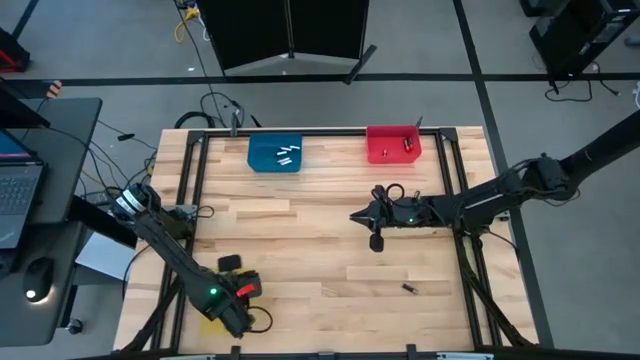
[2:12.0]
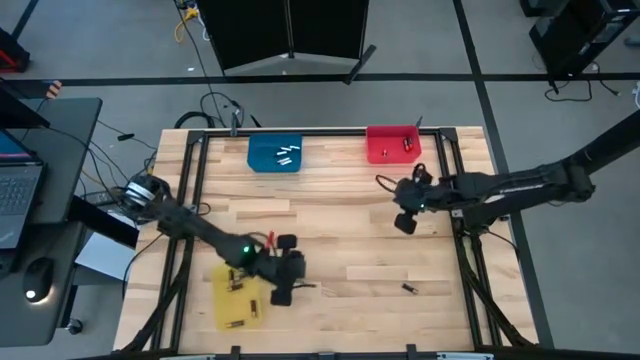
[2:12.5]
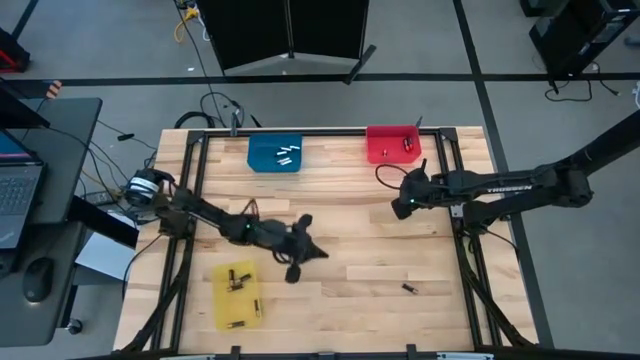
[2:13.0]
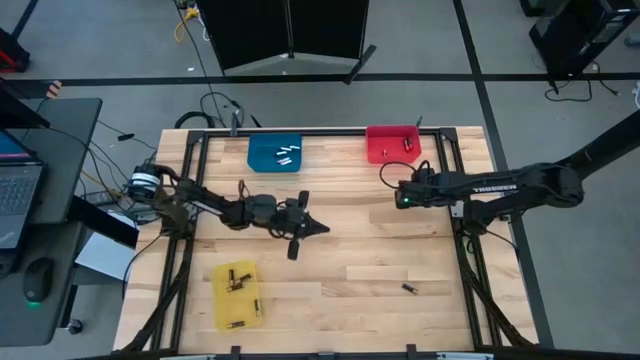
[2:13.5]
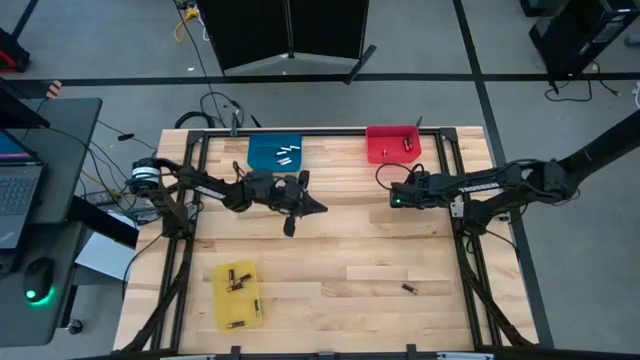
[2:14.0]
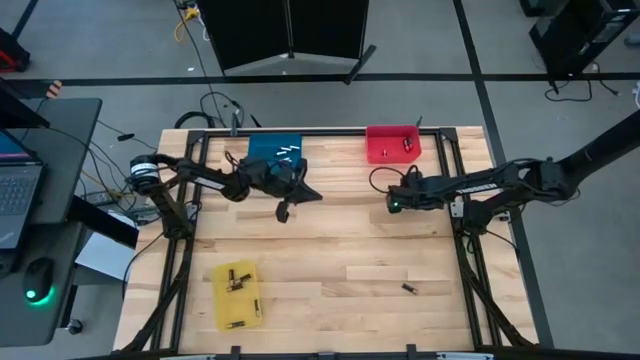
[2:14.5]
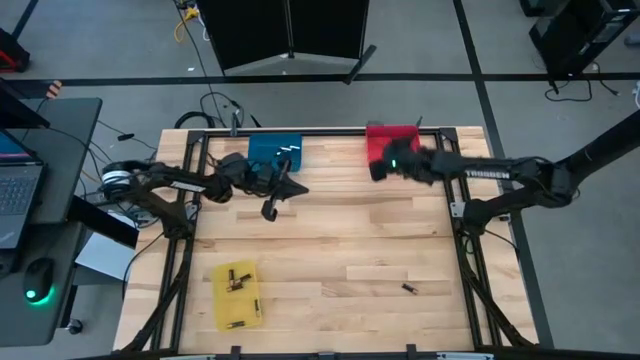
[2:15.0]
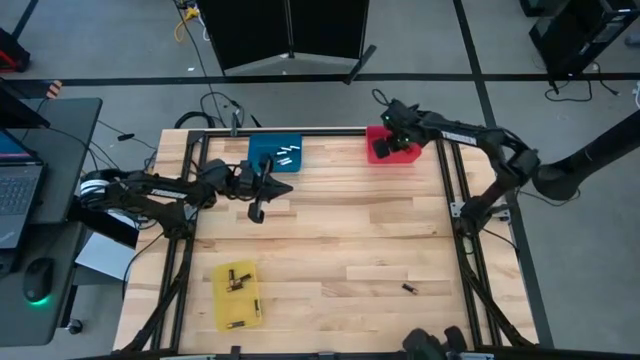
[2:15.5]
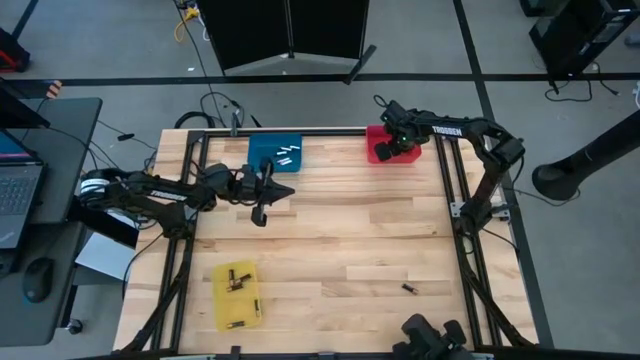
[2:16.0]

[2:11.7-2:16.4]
Task: Sort batteries
Put the black-red battery into the red bin

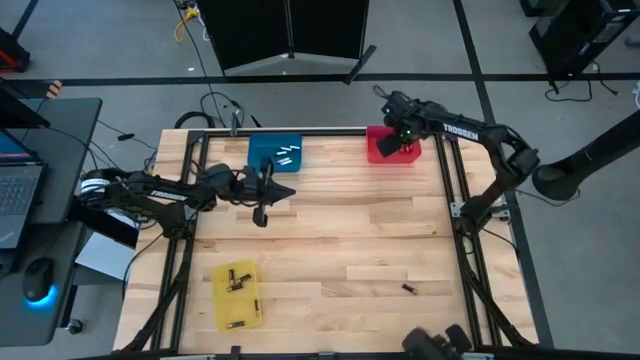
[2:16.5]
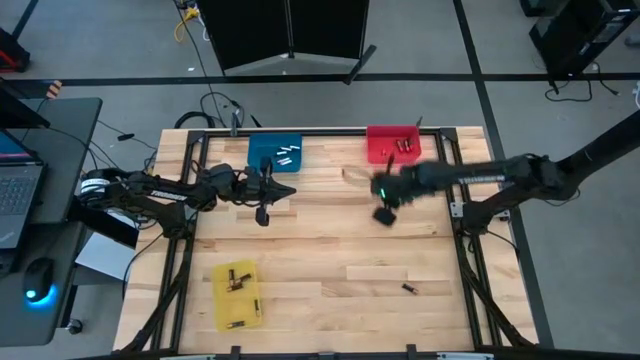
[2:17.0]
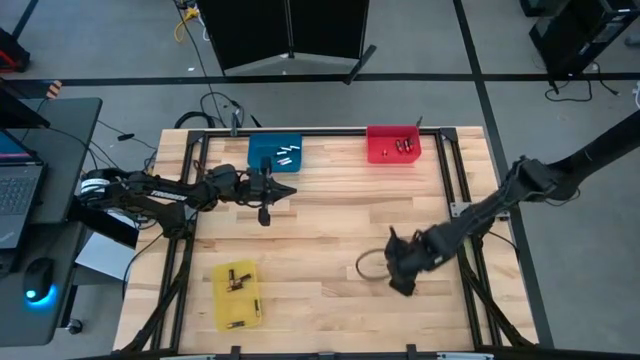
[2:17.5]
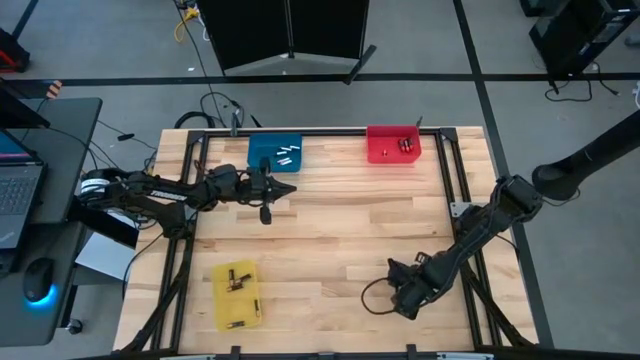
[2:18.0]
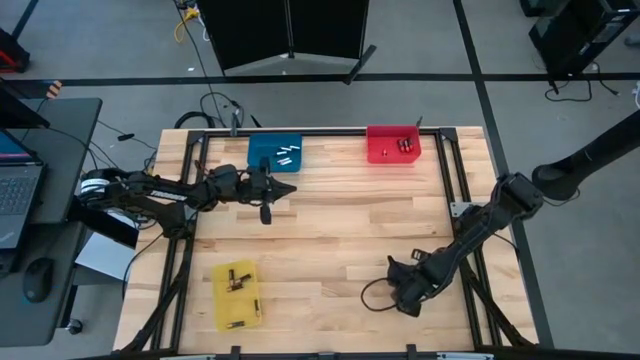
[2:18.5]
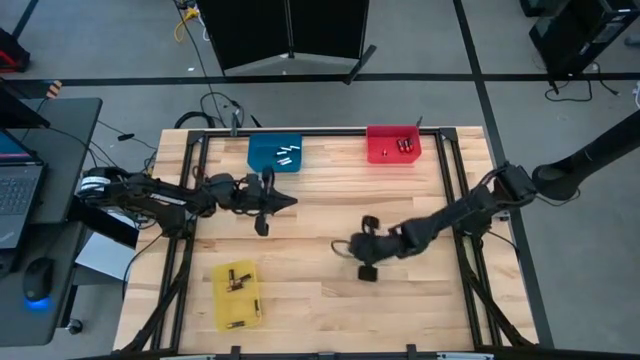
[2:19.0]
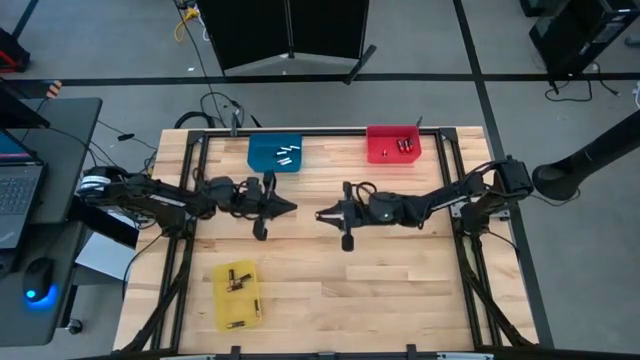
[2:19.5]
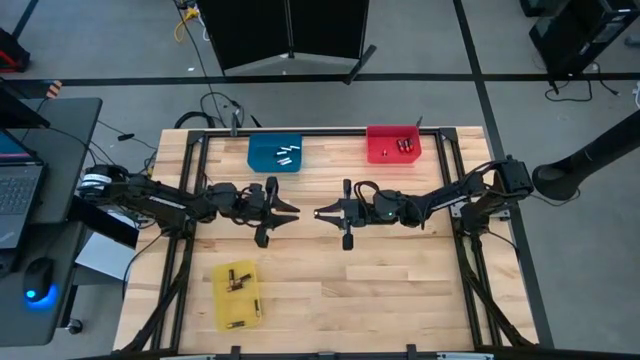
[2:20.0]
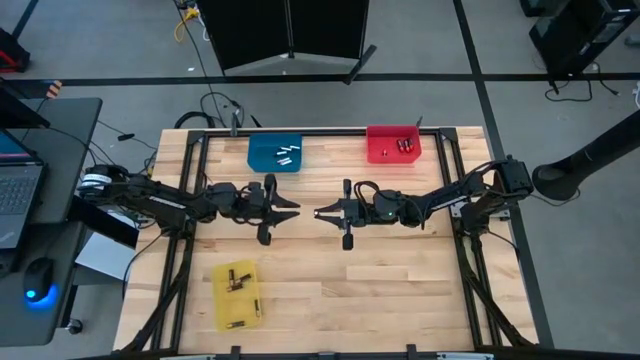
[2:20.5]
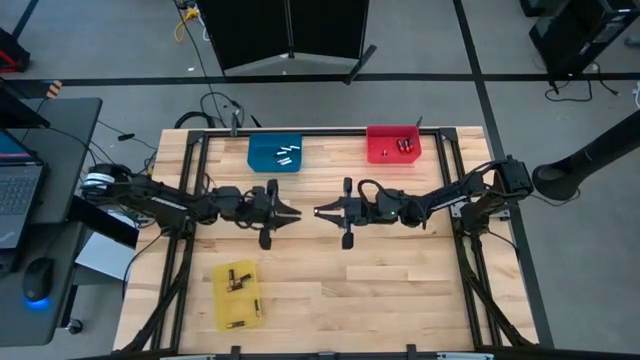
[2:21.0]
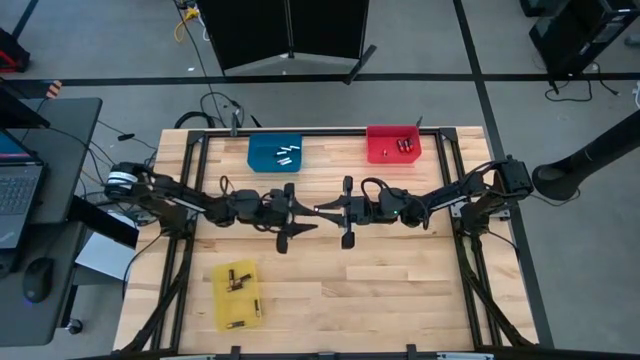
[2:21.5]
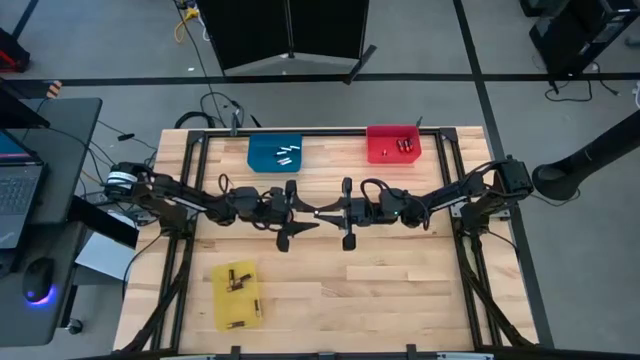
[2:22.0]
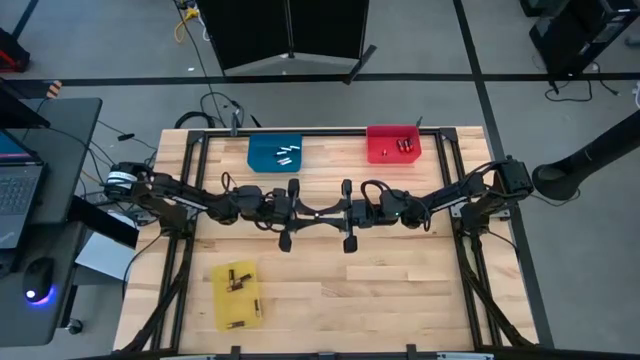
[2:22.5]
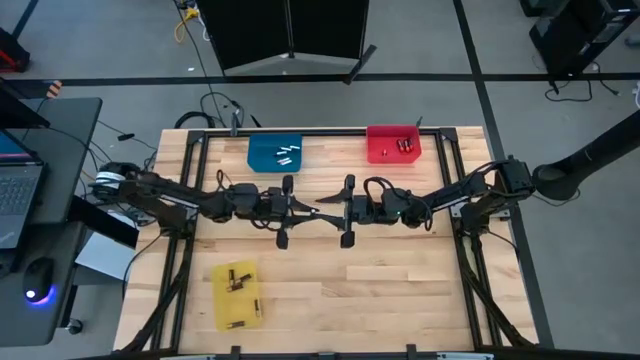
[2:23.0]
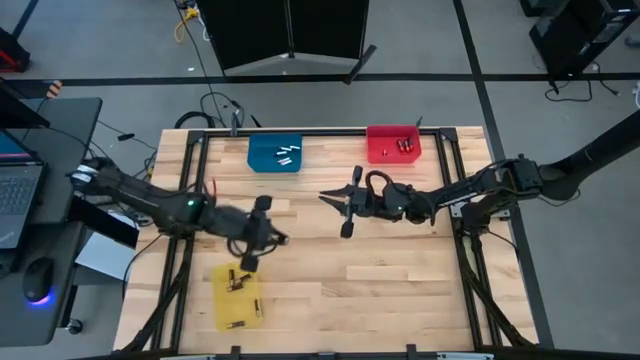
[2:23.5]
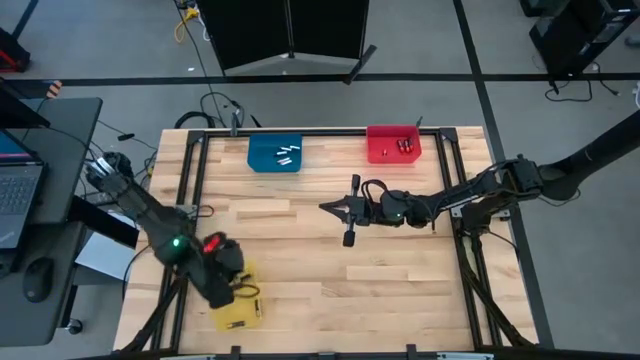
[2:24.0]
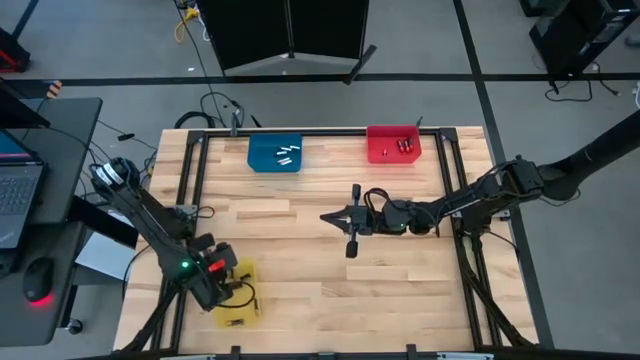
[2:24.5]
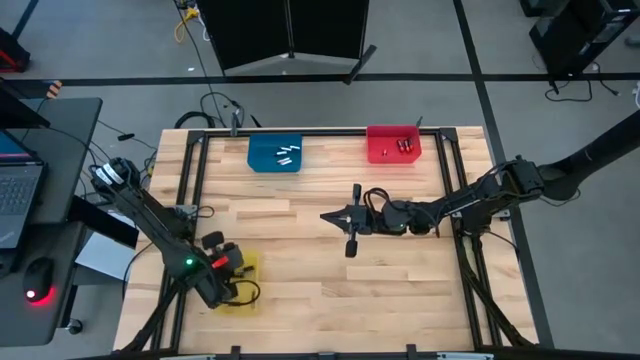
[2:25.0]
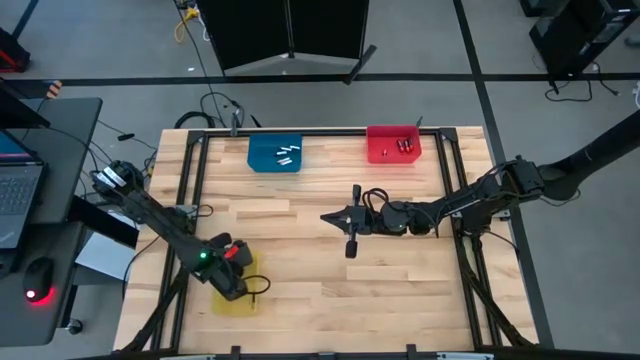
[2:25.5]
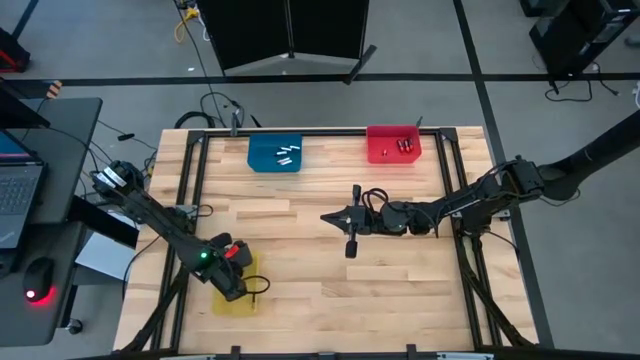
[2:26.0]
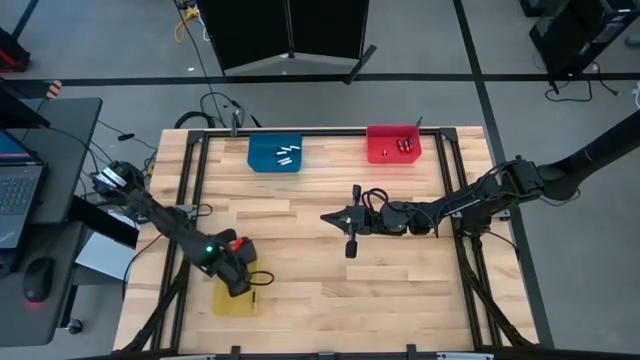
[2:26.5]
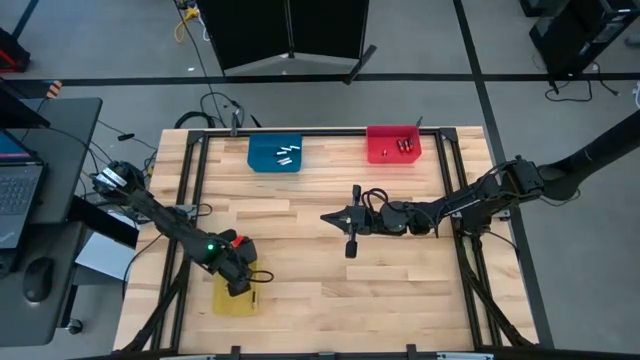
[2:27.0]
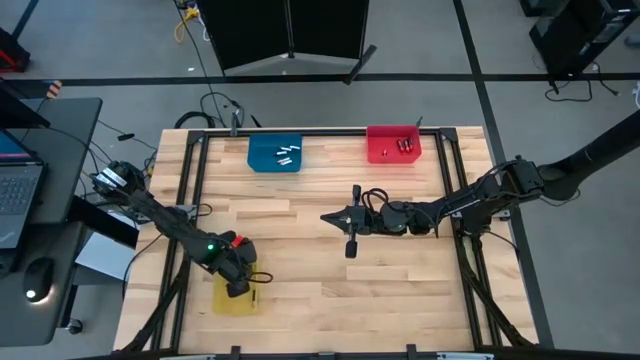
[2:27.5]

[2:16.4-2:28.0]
Put the black-brown battery into the yellow bin

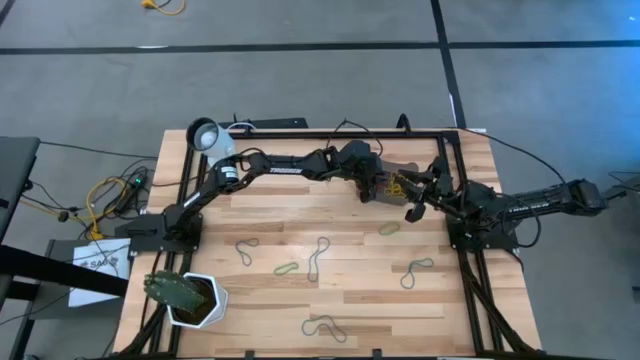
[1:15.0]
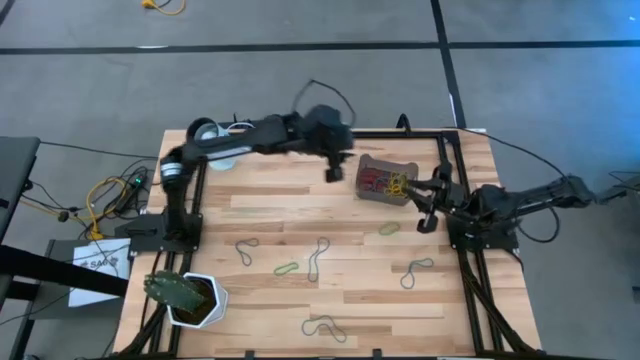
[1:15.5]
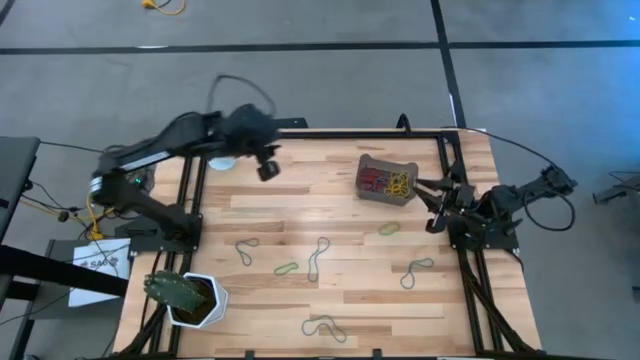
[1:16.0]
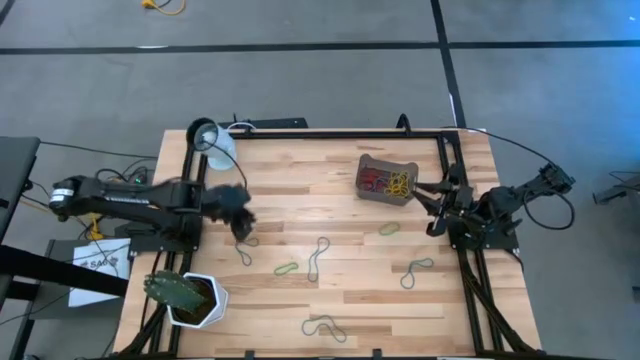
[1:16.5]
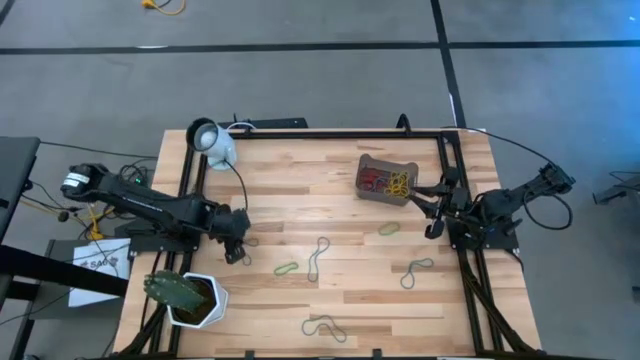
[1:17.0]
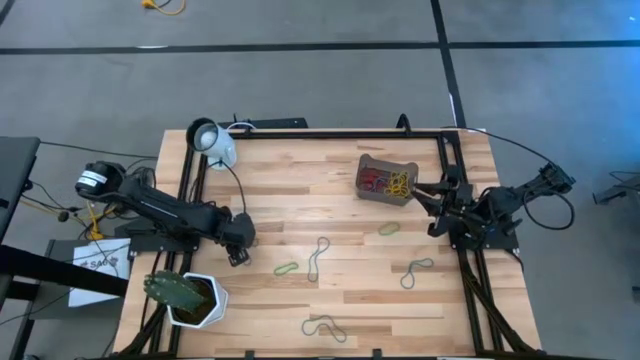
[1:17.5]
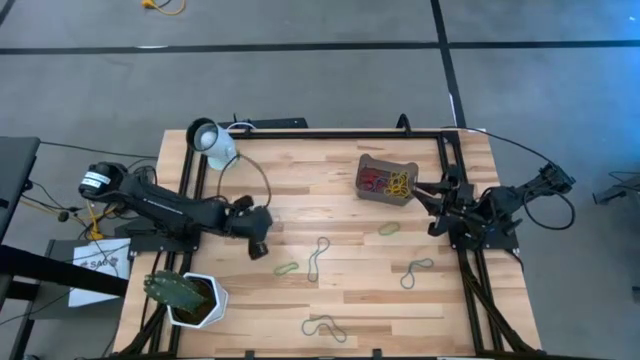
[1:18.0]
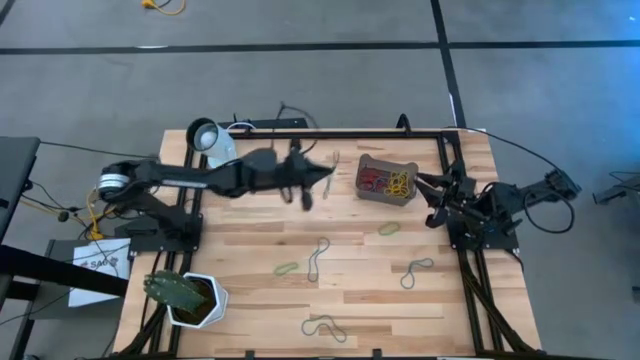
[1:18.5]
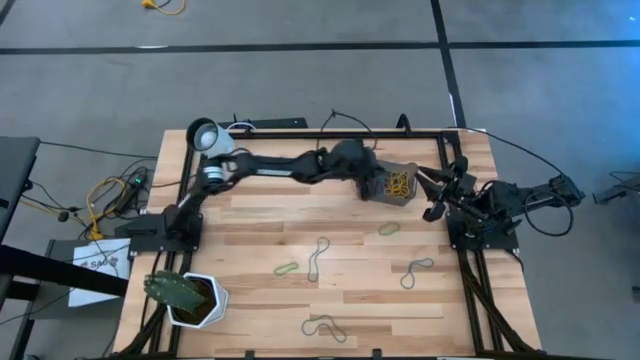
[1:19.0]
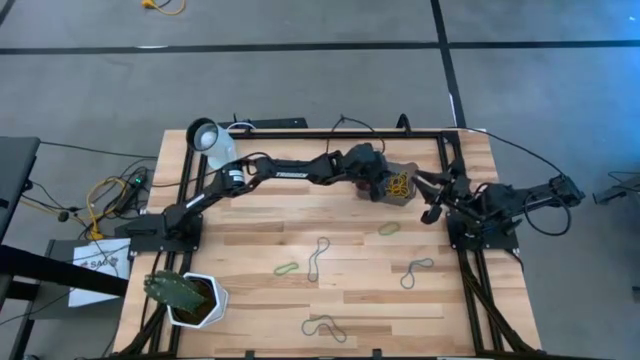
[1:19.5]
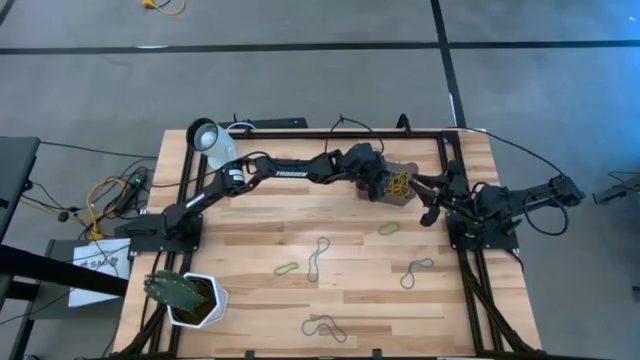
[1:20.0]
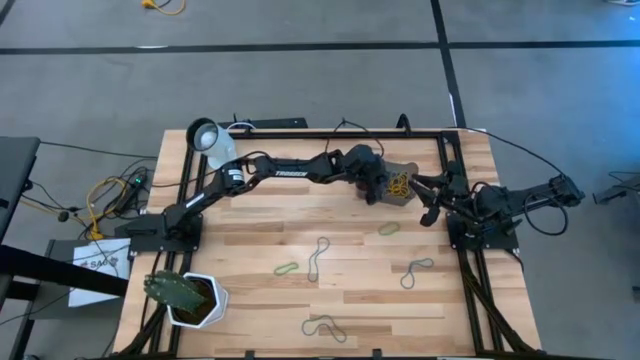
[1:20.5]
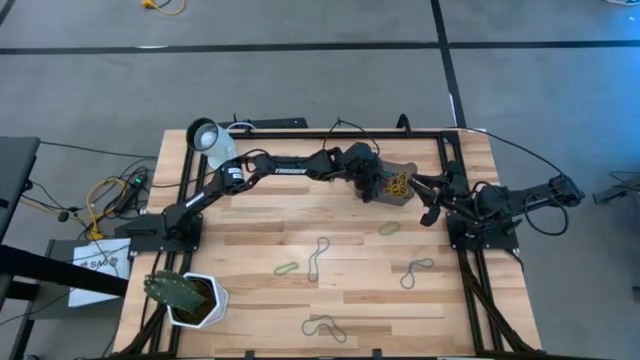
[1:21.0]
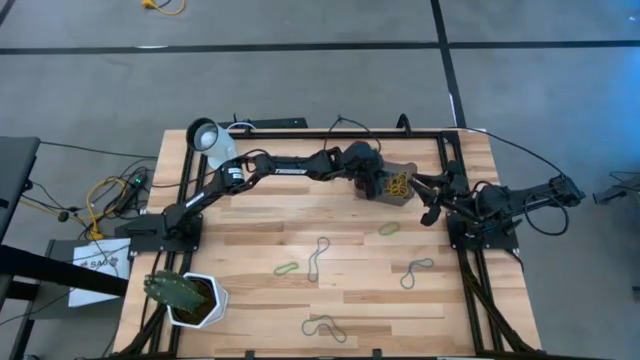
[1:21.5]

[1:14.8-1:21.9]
Task: Pick and place rubber bands into bin
Put the blue rubber band into the black container
